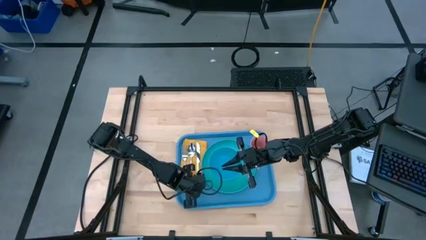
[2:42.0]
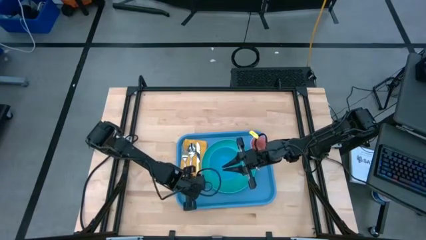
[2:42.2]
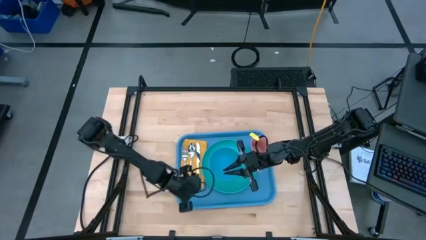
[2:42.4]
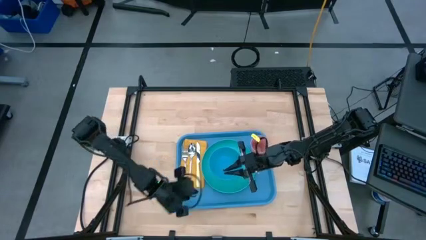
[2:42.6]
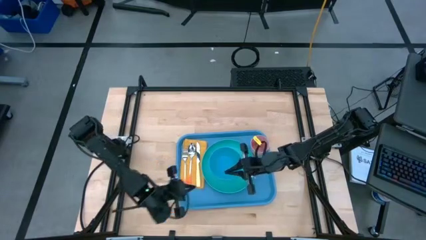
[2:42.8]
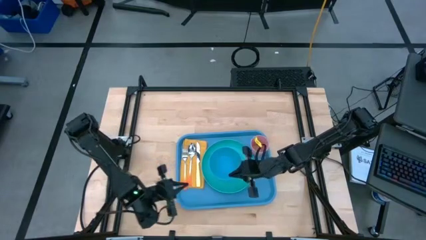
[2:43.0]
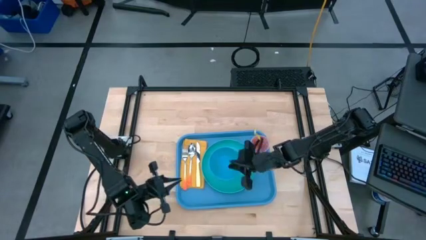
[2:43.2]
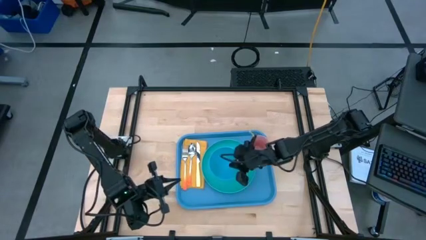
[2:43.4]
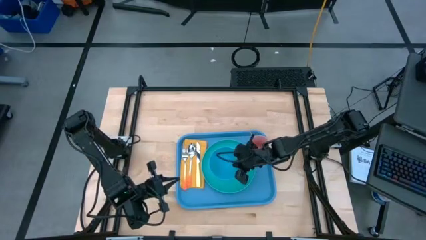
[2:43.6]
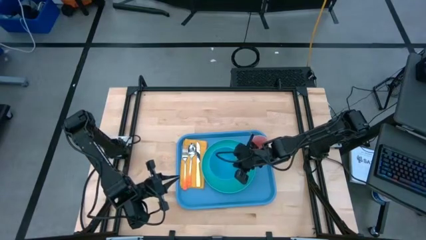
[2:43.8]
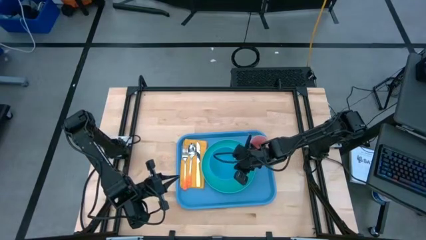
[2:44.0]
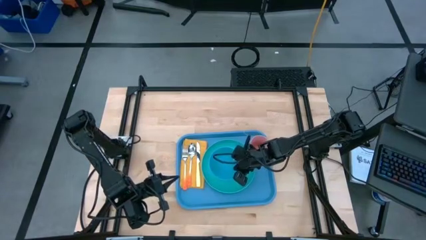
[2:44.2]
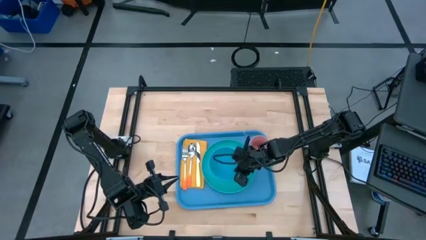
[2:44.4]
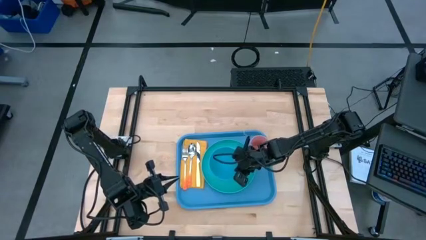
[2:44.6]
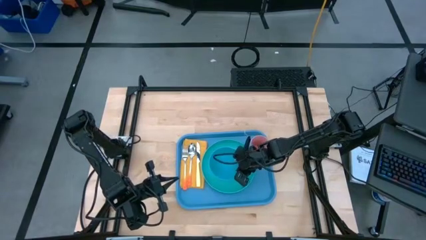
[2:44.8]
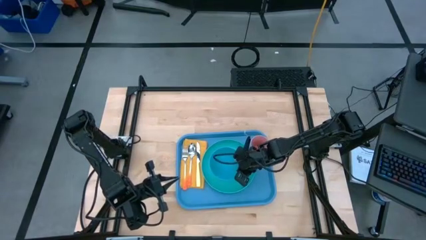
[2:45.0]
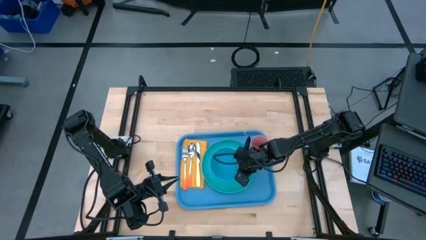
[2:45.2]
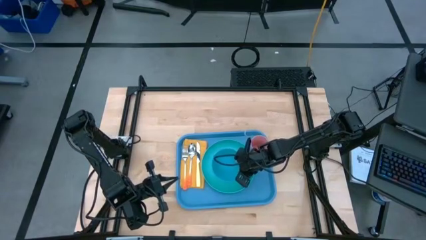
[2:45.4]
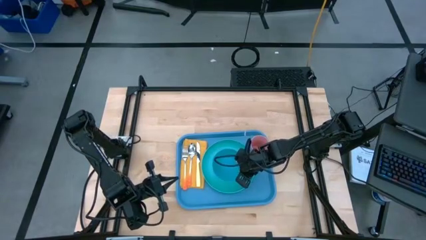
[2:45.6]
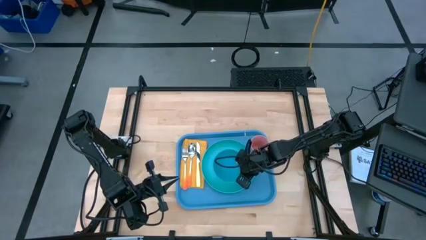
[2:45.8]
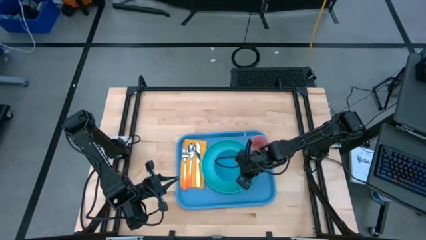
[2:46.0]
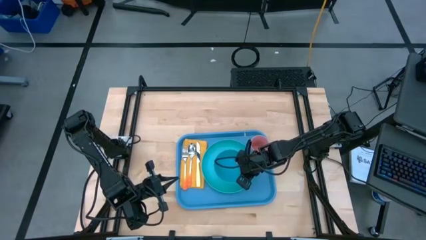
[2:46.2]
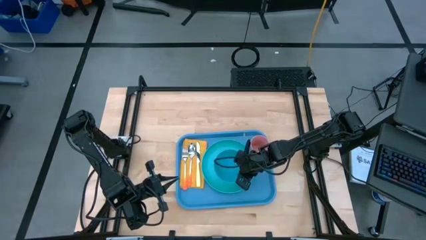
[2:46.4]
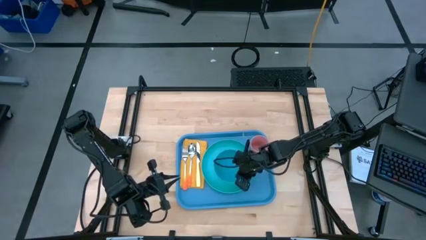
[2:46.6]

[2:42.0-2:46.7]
Task: Set up tray
Adjust the blue bowl on the blue plate

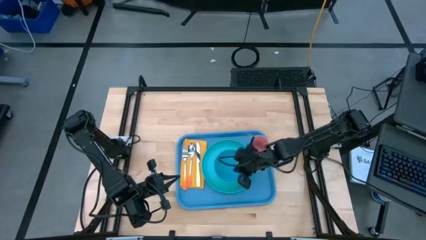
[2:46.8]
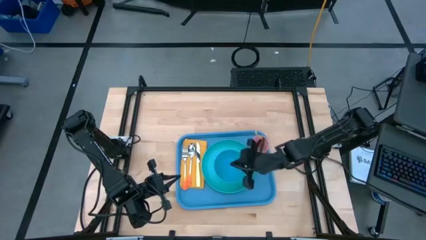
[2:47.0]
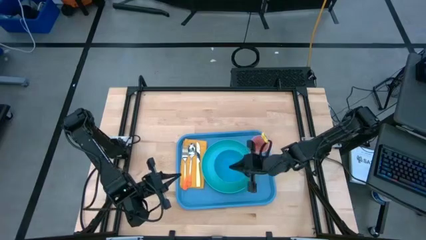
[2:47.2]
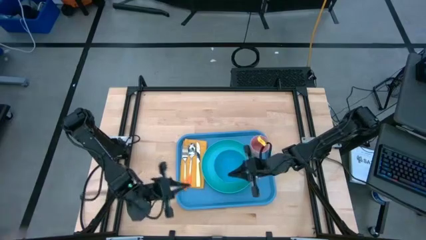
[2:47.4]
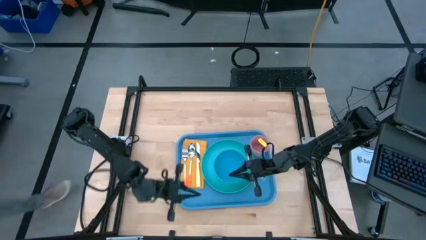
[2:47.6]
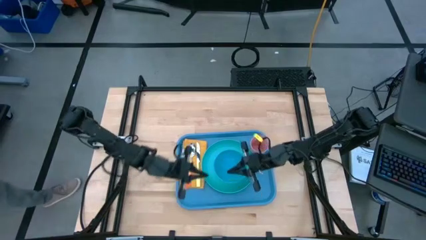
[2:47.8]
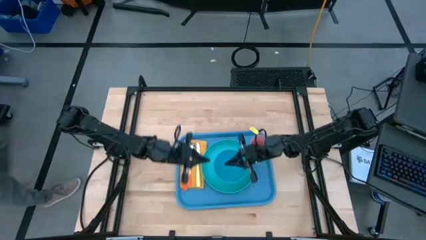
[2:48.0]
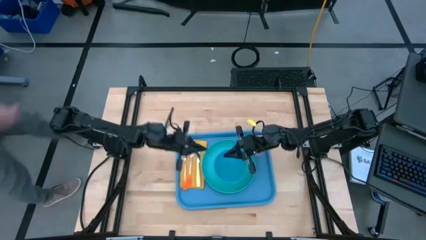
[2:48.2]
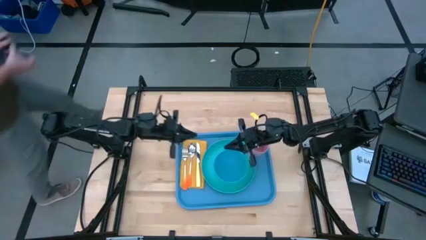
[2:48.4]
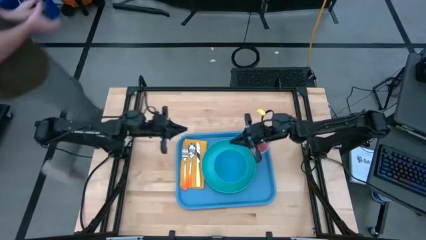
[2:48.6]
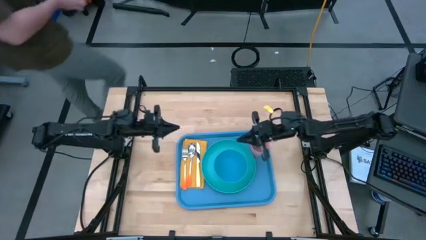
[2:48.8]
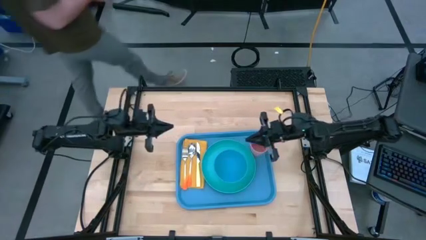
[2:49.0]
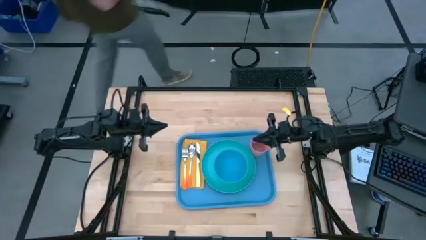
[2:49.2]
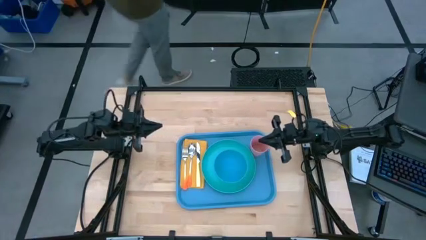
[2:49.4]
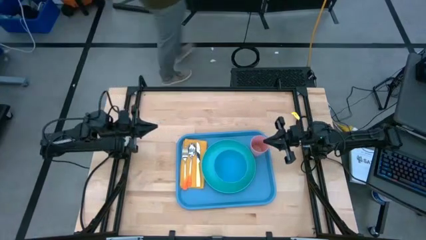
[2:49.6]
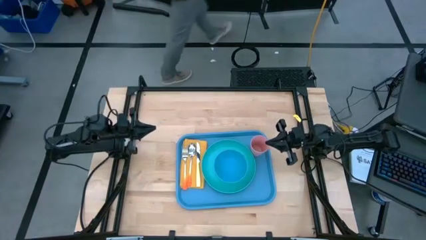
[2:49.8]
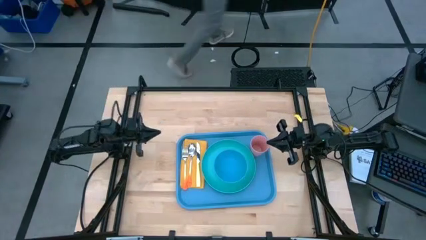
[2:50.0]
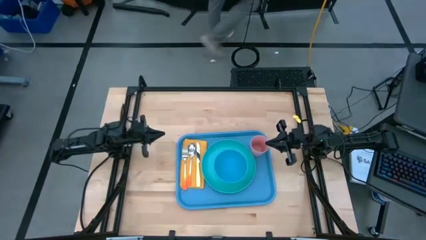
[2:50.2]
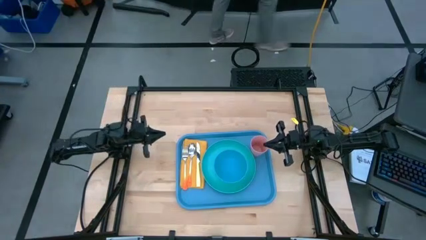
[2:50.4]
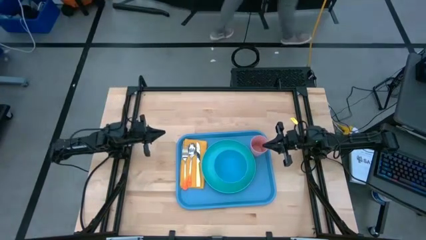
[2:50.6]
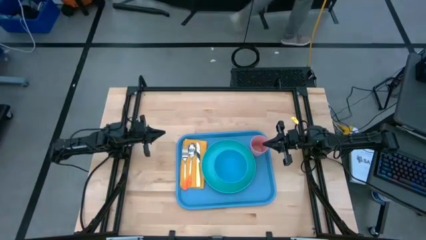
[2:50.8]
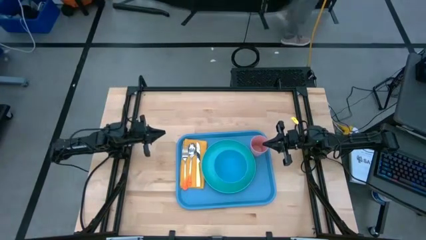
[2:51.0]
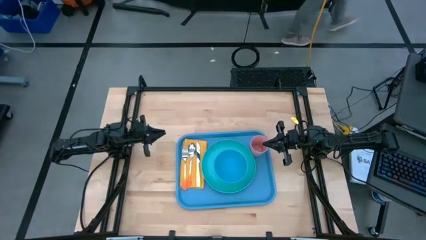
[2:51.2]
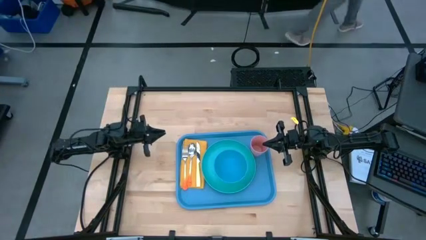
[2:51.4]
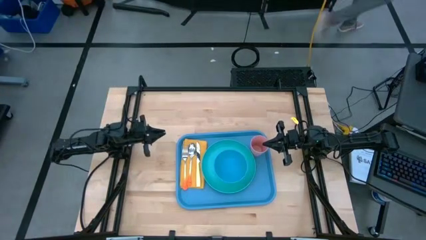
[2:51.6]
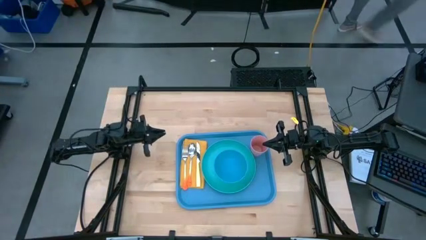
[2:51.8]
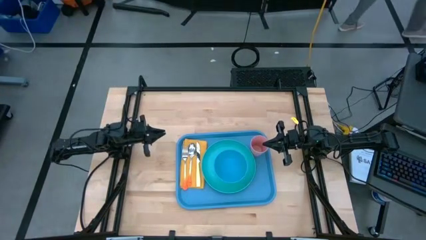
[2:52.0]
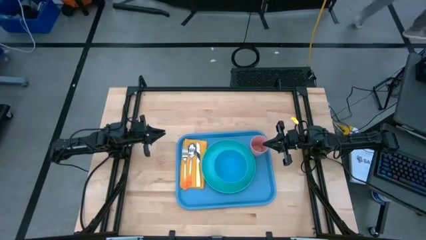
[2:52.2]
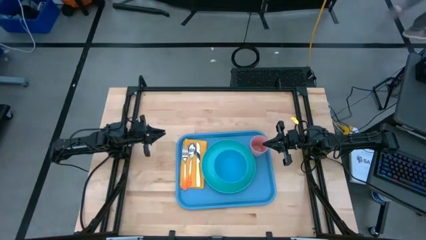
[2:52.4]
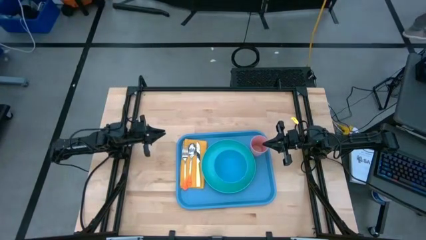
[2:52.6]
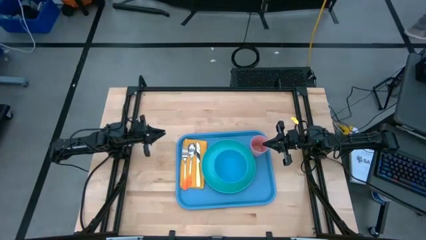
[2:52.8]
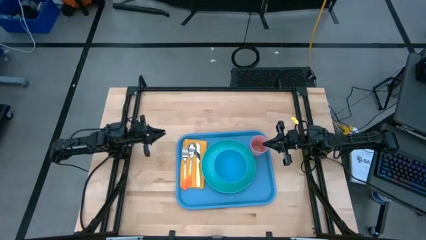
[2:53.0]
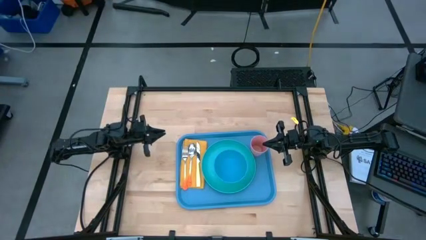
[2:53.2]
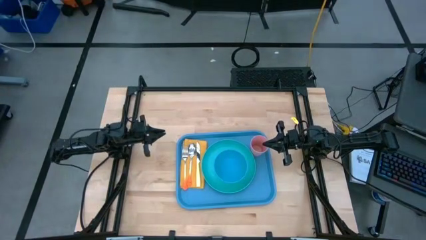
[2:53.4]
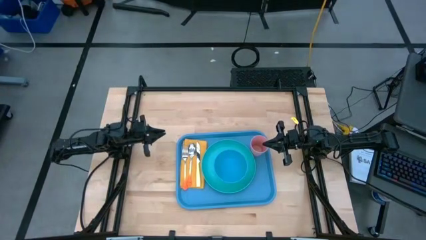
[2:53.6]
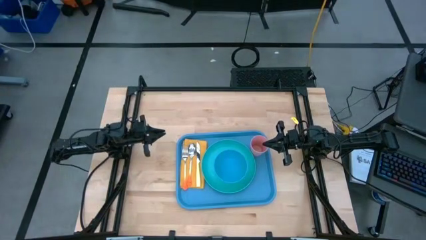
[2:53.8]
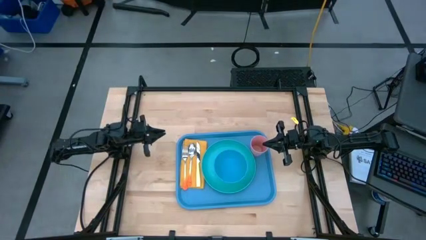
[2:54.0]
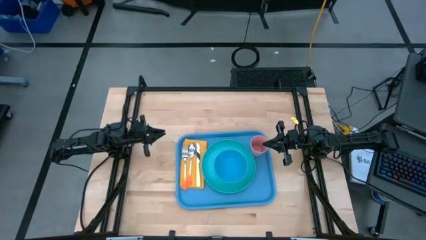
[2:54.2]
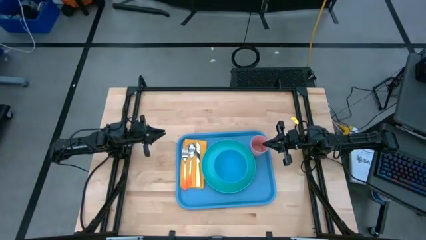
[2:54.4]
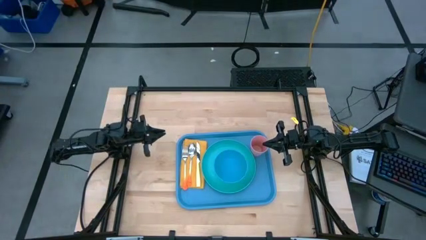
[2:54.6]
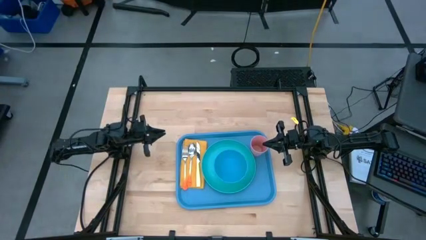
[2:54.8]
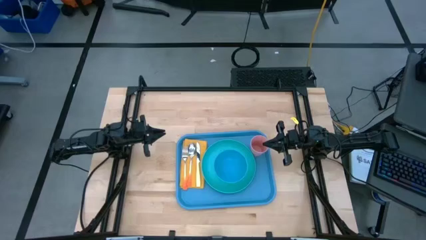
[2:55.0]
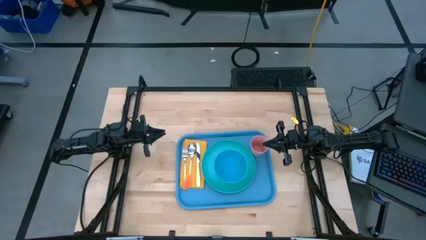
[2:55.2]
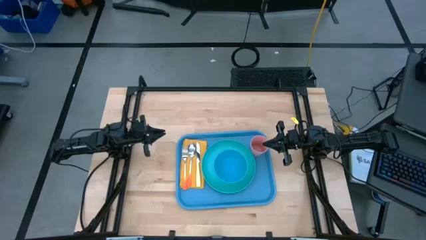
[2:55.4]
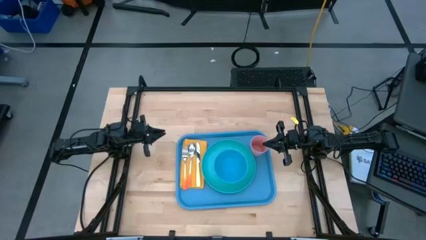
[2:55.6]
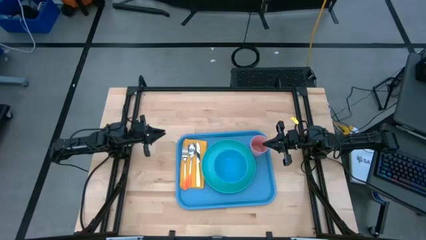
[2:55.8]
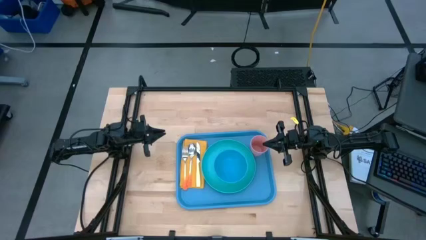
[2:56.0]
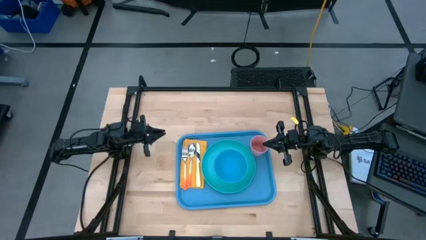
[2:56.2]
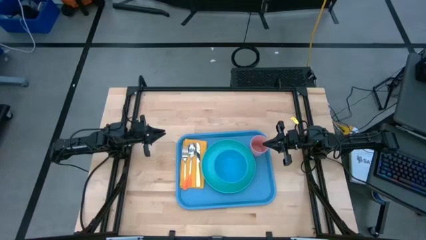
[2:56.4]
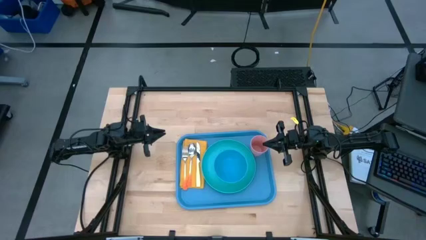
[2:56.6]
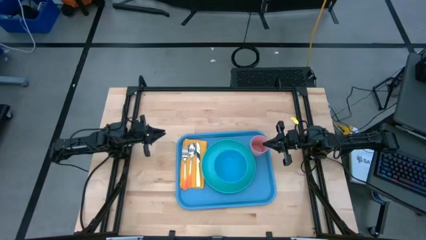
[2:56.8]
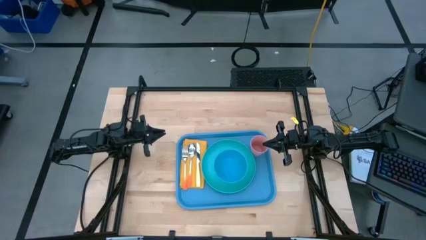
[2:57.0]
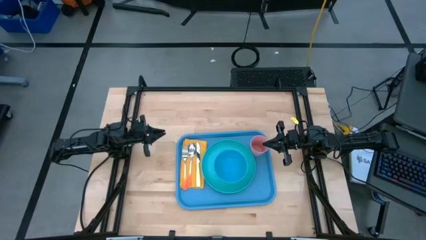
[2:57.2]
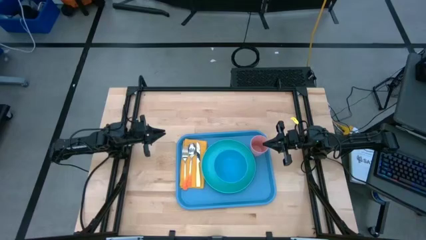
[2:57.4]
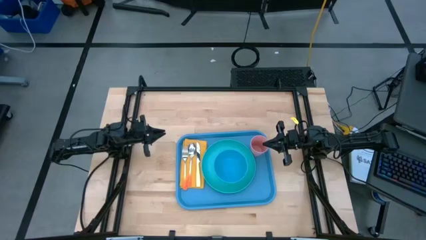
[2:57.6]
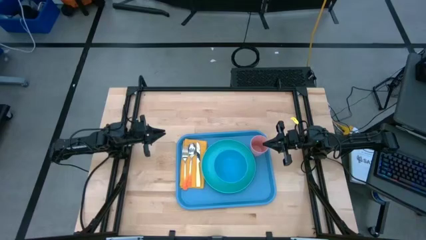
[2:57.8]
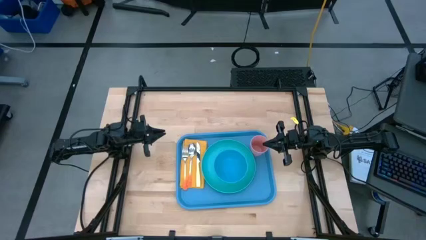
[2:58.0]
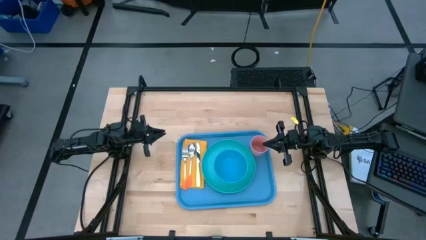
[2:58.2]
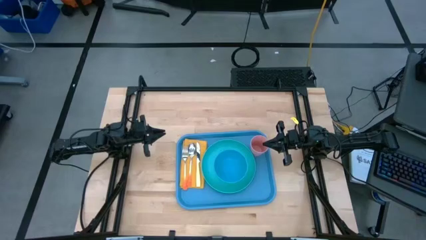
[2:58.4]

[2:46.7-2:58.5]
Return to Home Position

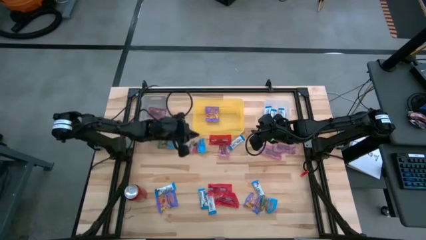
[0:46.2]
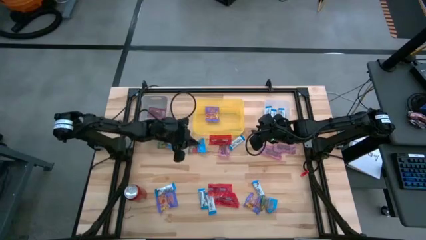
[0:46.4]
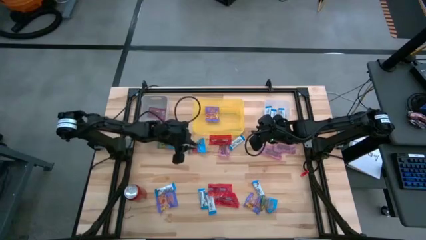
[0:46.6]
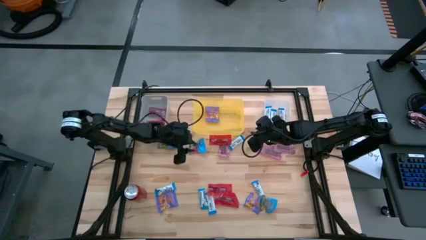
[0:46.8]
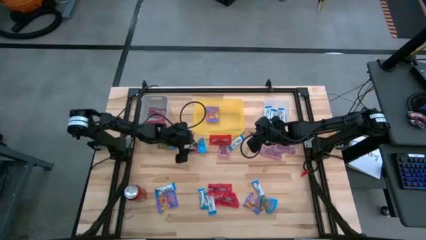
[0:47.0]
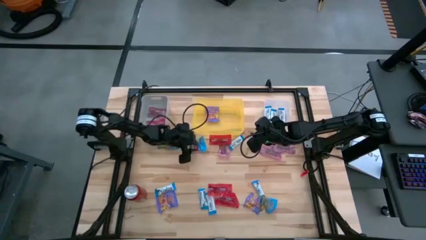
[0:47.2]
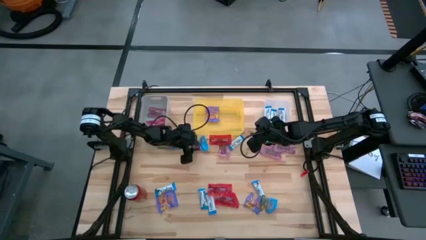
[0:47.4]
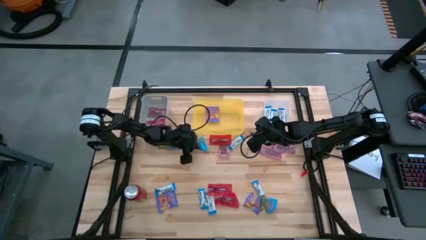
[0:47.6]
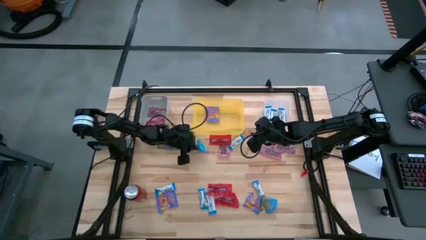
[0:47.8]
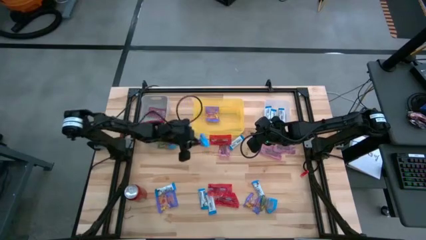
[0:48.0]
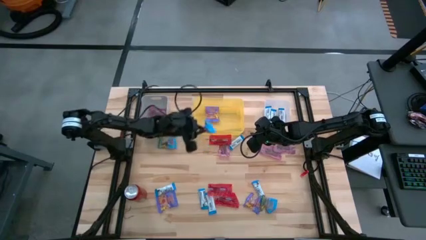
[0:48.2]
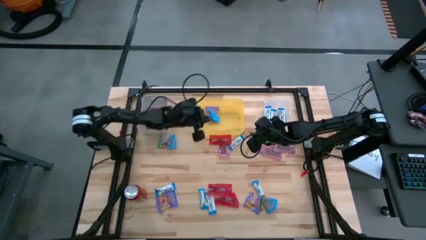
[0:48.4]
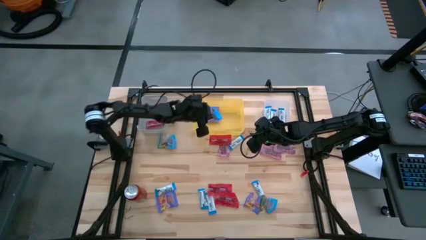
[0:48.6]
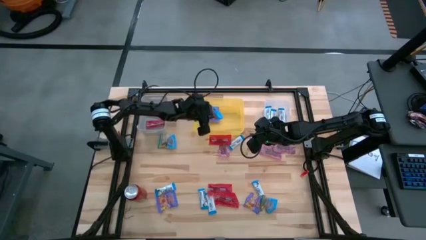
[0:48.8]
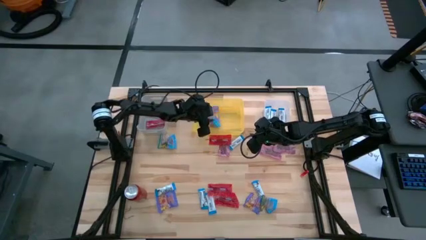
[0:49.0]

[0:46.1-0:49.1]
Task: Sort candy
Put the blue gummy into the yellow bin
